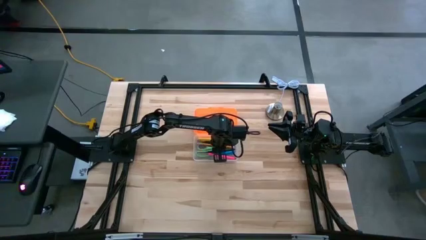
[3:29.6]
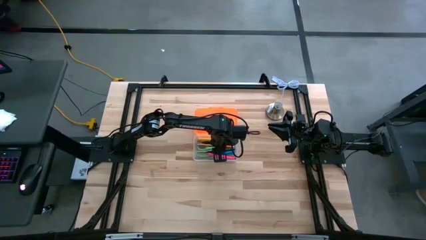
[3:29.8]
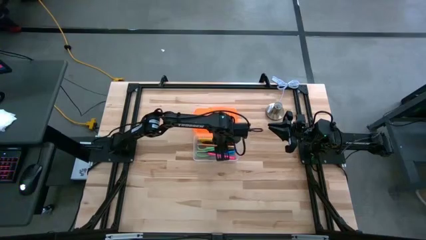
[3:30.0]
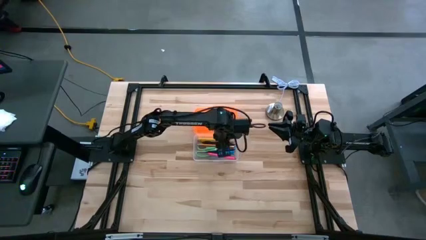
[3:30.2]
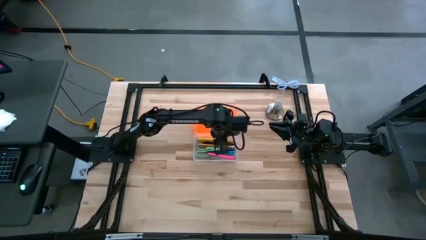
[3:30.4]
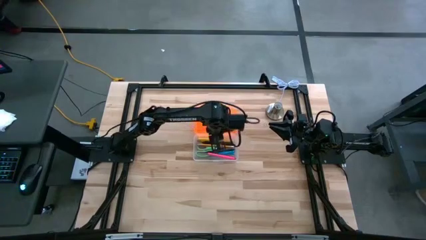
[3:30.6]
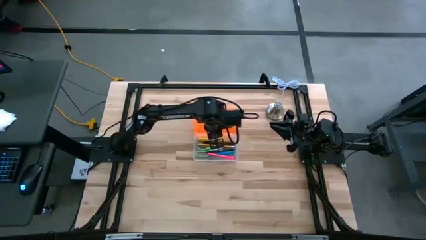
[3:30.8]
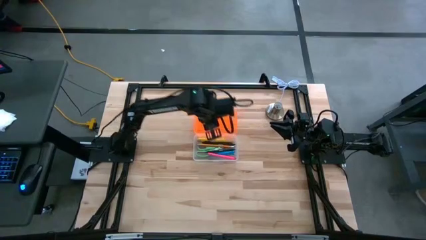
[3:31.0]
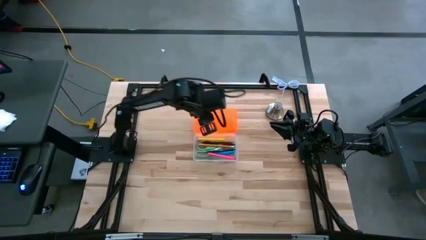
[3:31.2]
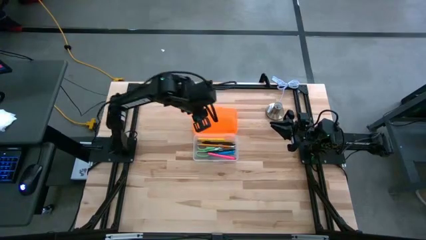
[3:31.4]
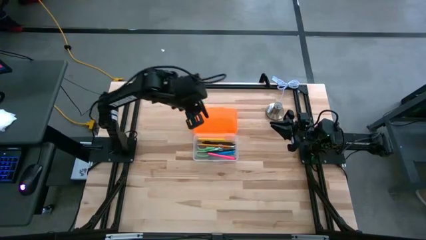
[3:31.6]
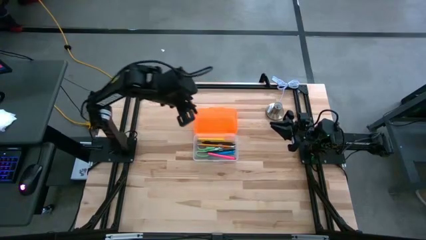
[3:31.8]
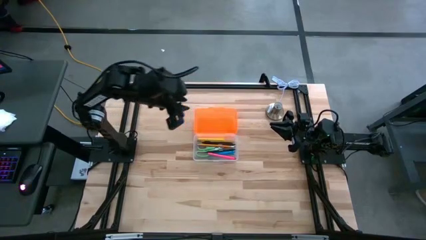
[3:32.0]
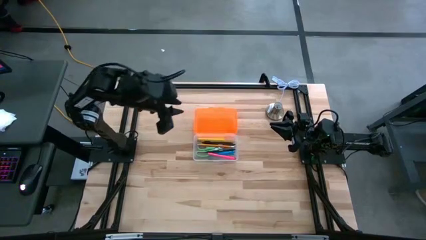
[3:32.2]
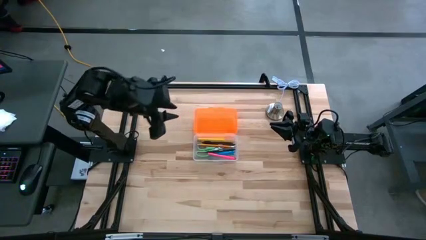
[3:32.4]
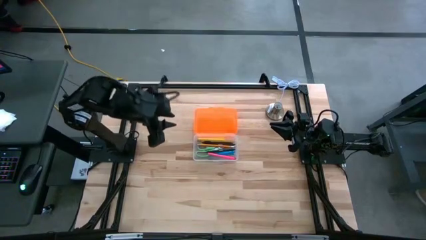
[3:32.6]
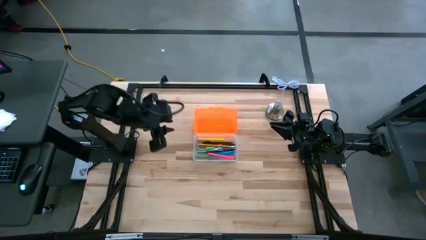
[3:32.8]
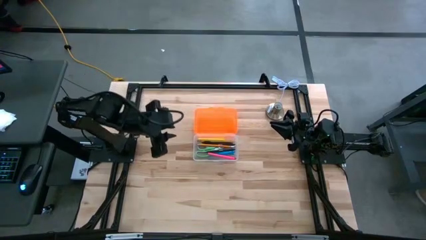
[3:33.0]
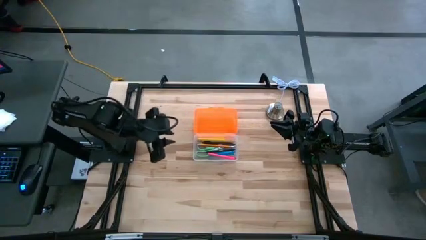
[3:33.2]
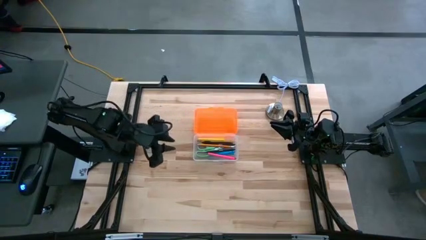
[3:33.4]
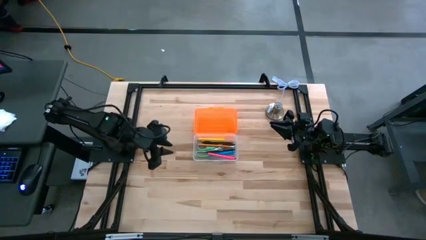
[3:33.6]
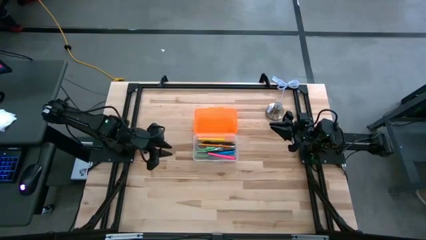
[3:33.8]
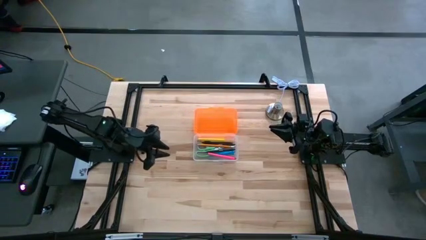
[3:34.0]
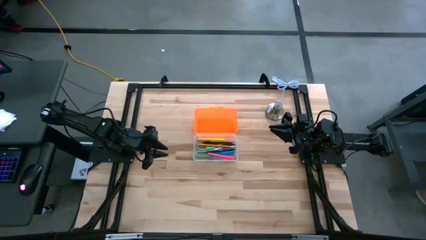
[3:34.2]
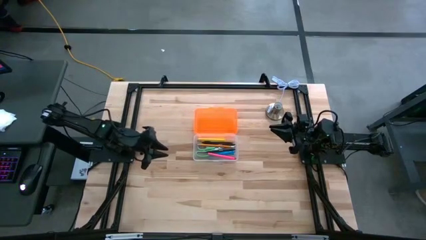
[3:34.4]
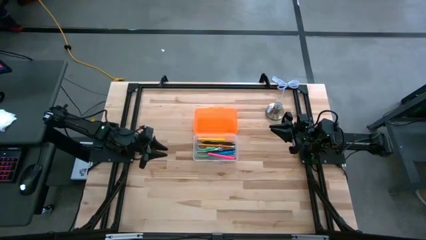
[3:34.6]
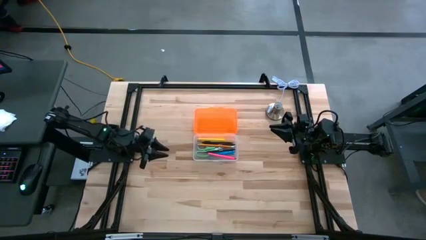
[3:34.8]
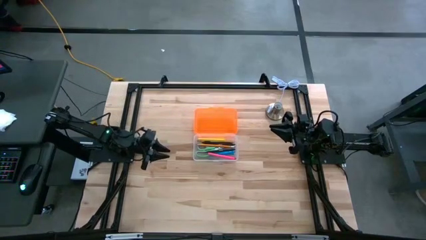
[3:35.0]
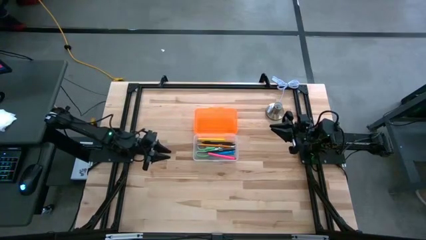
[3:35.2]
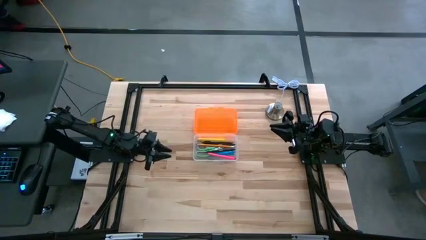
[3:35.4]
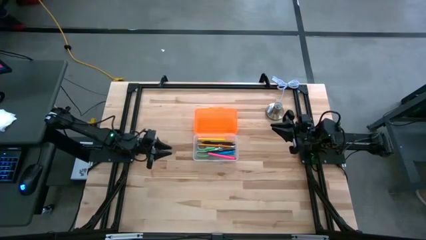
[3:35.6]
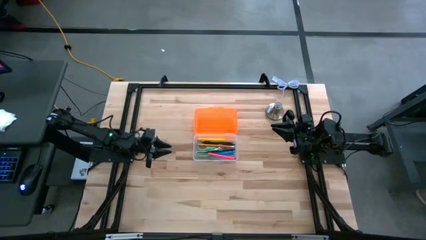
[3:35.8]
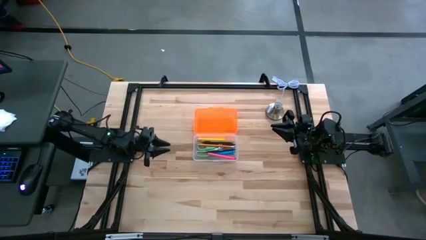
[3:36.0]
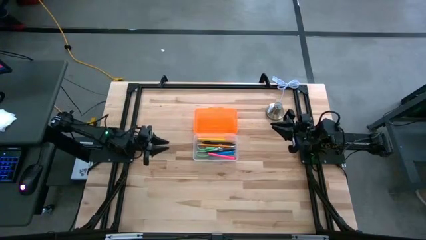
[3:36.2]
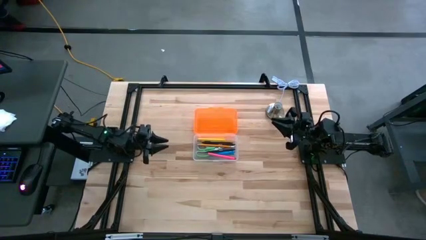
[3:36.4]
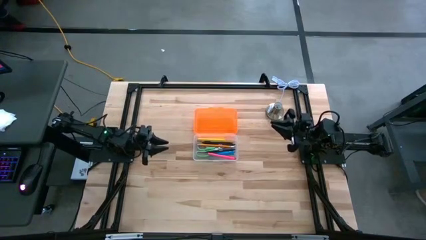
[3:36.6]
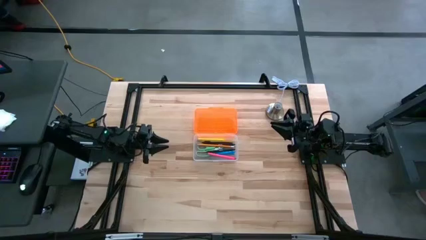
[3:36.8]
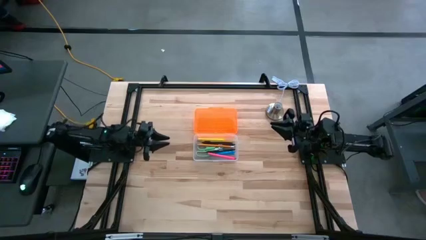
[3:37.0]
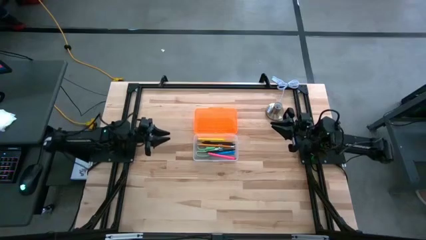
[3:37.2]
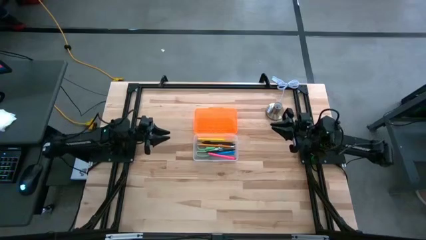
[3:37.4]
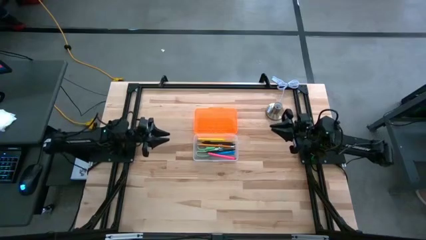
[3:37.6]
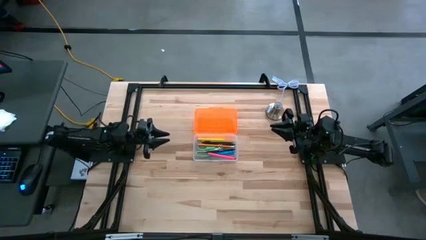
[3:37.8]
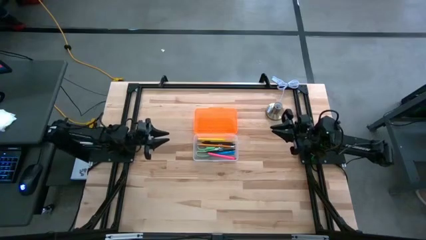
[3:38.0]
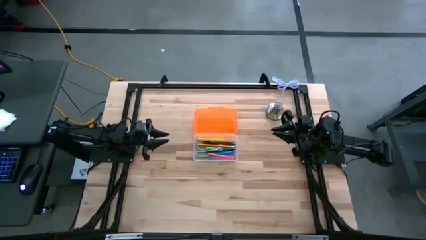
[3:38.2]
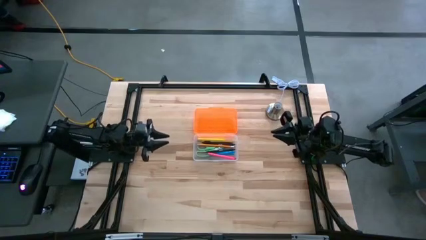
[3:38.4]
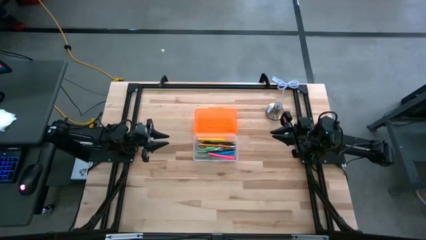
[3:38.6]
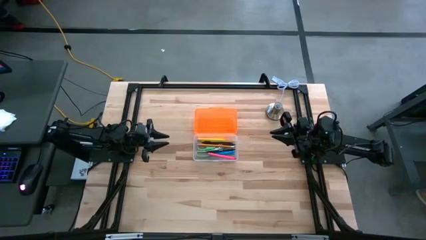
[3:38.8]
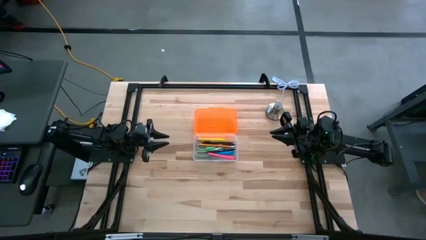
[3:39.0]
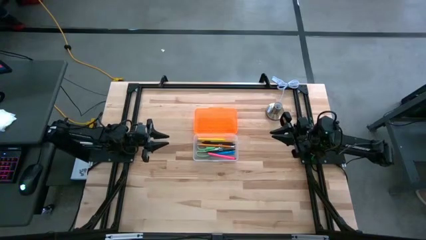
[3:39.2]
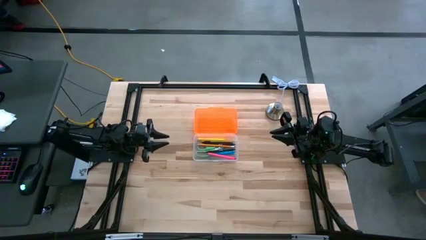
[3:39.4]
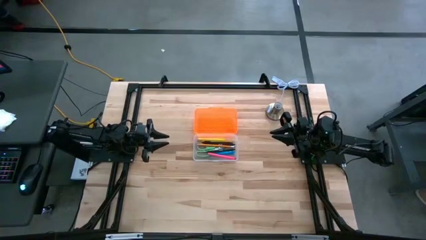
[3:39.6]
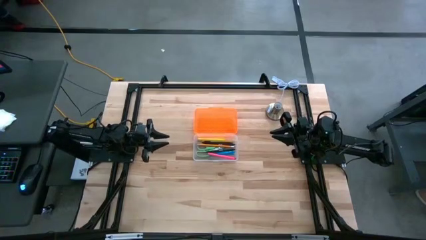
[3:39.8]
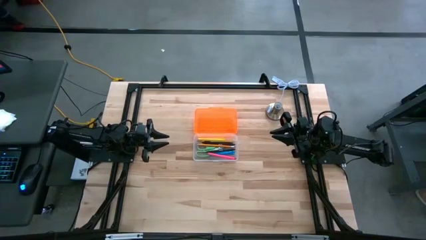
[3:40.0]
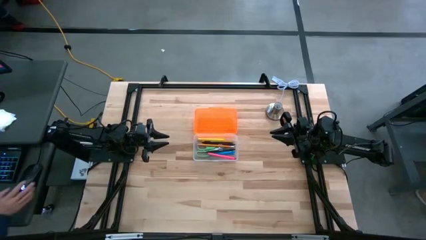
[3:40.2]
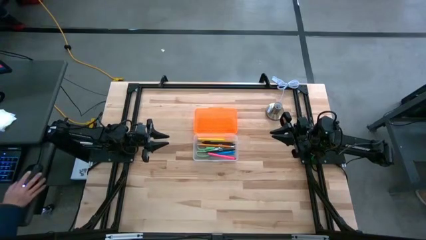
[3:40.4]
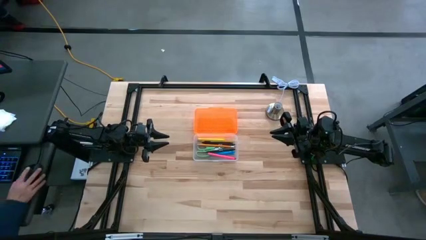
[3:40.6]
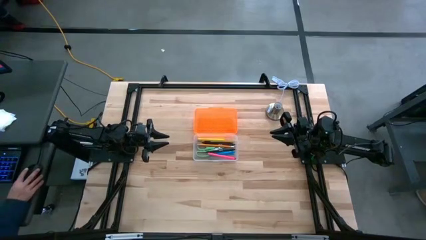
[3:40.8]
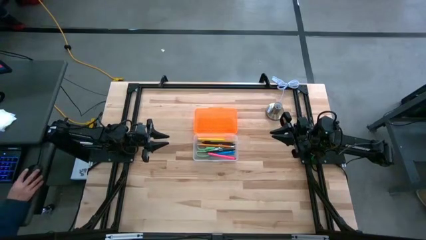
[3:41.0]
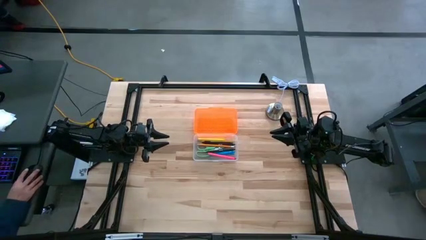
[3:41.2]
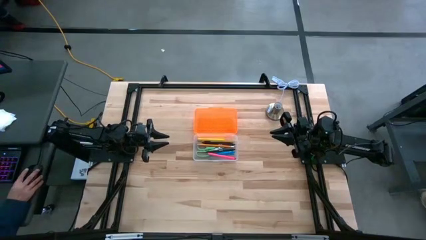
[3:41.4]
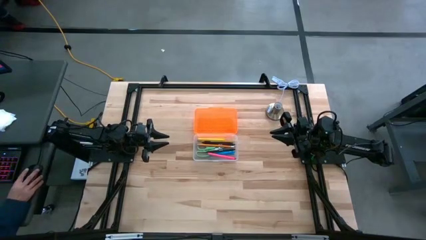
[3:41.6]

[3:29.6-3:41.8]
Task: Pick & place school supplies into a supply box
Return to Home Position
